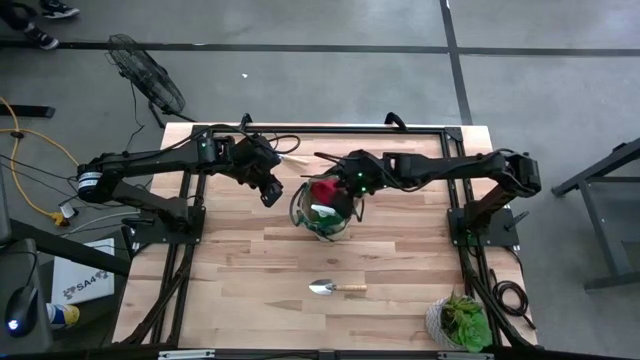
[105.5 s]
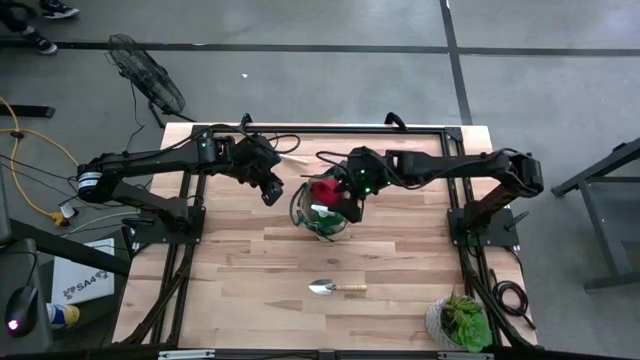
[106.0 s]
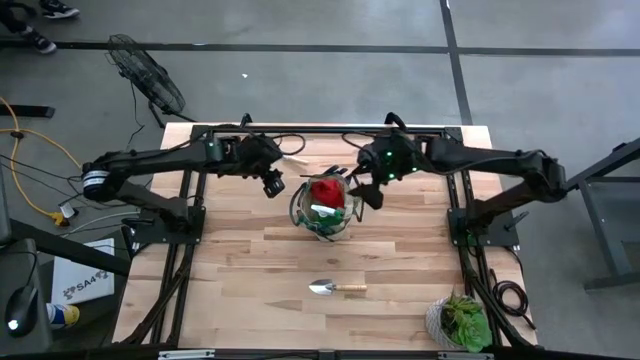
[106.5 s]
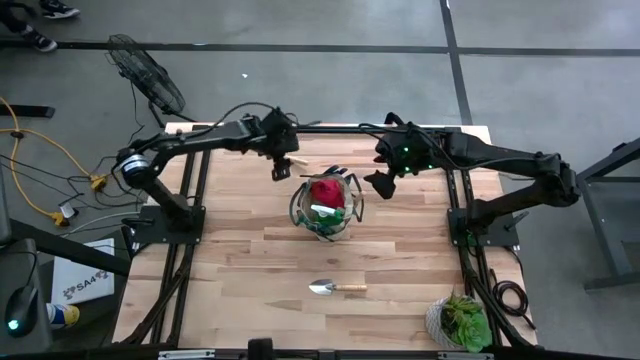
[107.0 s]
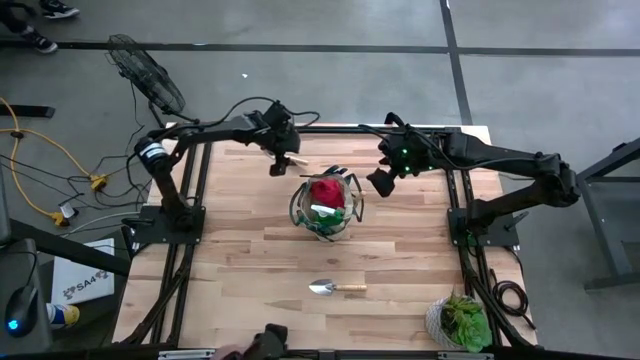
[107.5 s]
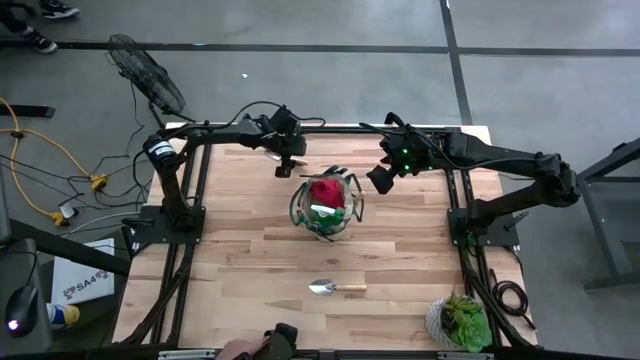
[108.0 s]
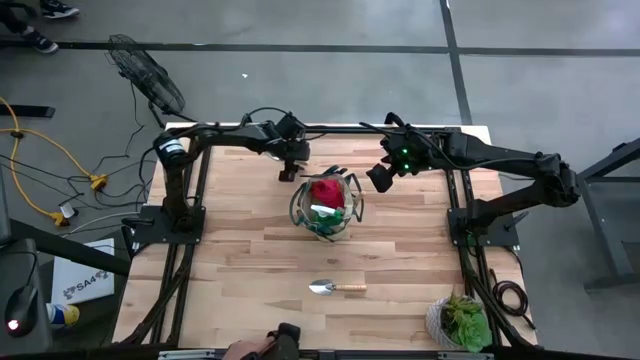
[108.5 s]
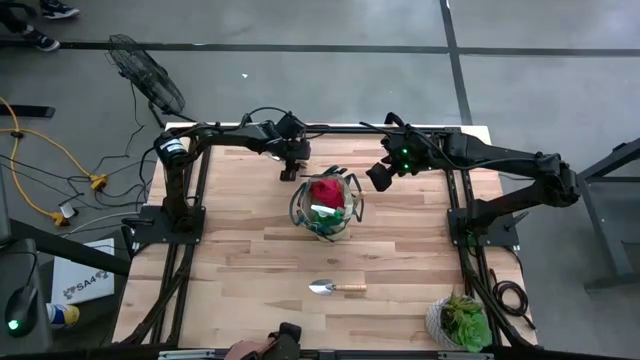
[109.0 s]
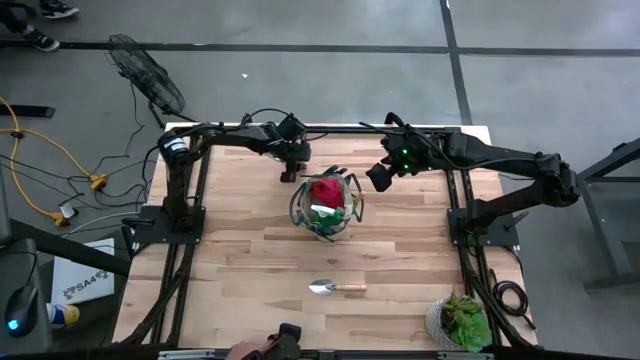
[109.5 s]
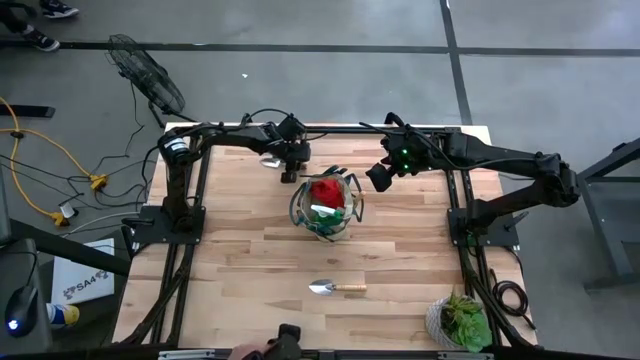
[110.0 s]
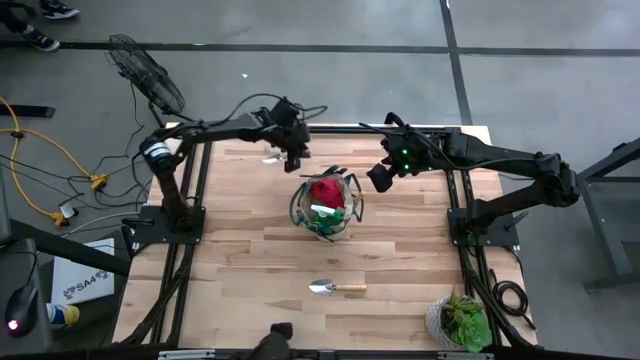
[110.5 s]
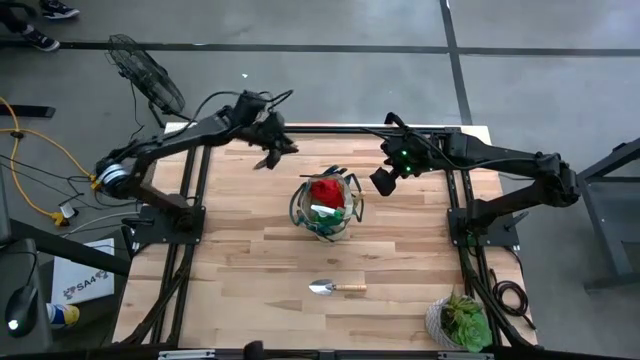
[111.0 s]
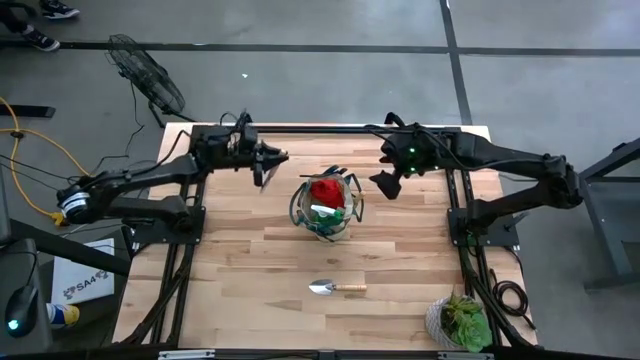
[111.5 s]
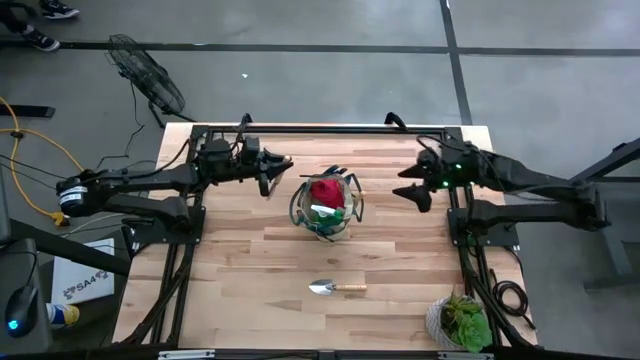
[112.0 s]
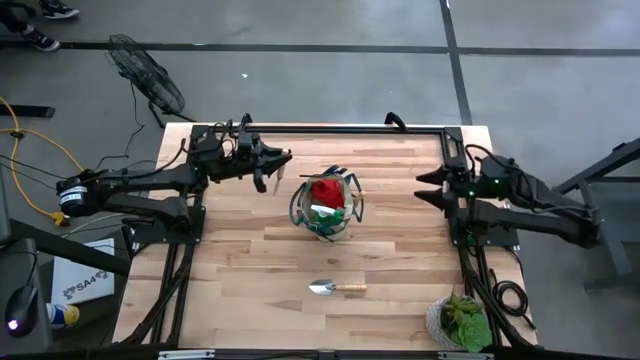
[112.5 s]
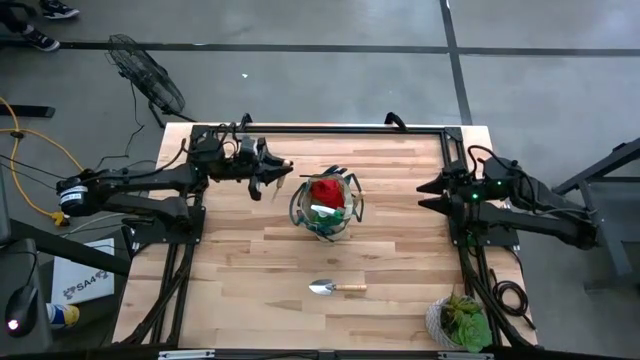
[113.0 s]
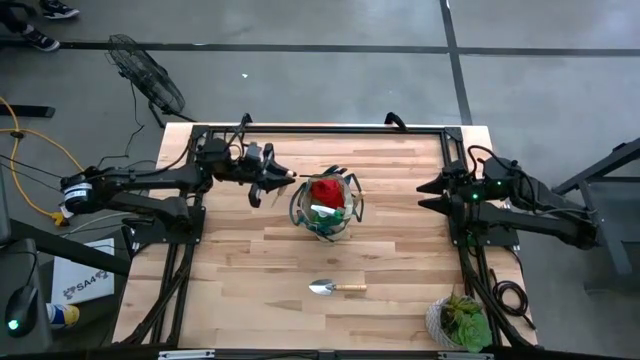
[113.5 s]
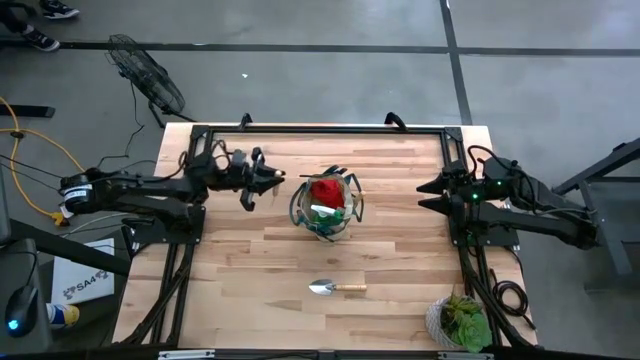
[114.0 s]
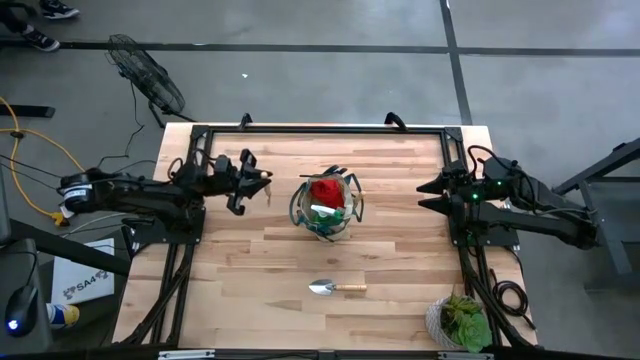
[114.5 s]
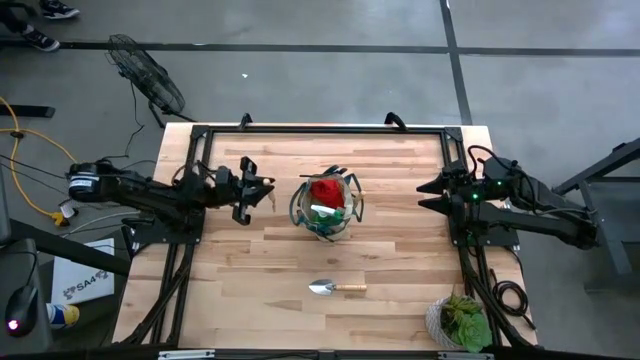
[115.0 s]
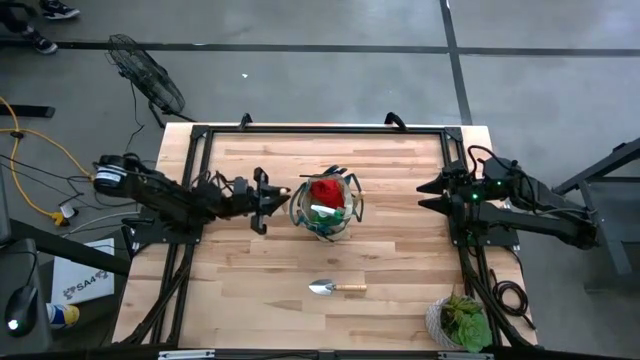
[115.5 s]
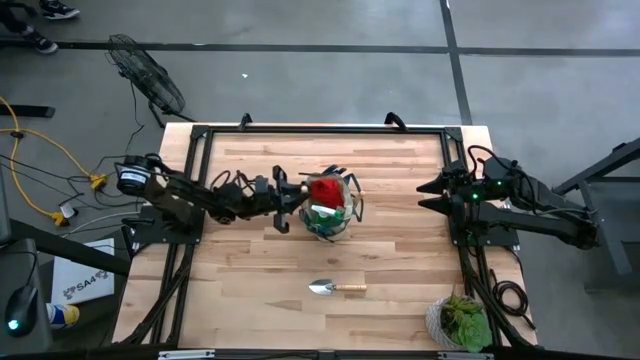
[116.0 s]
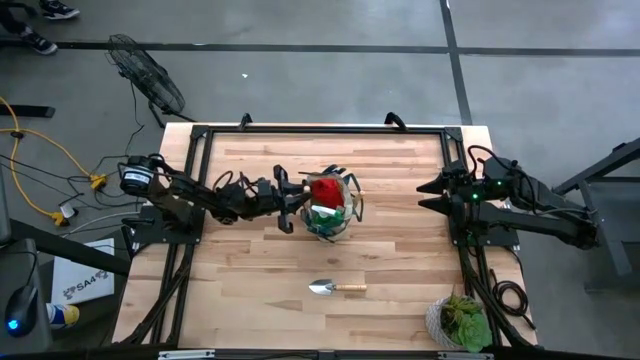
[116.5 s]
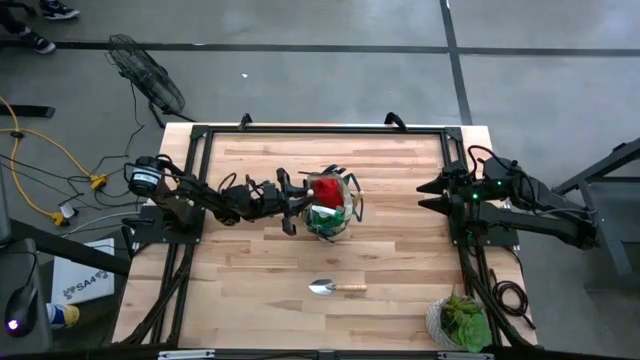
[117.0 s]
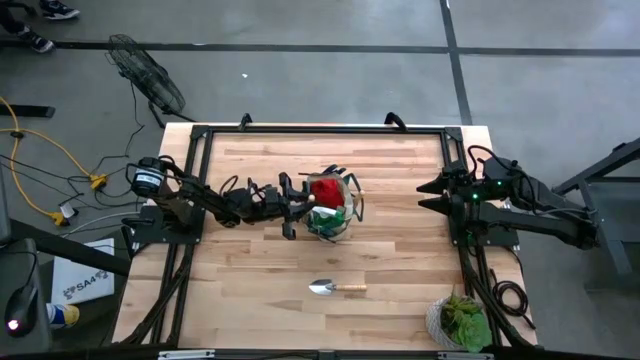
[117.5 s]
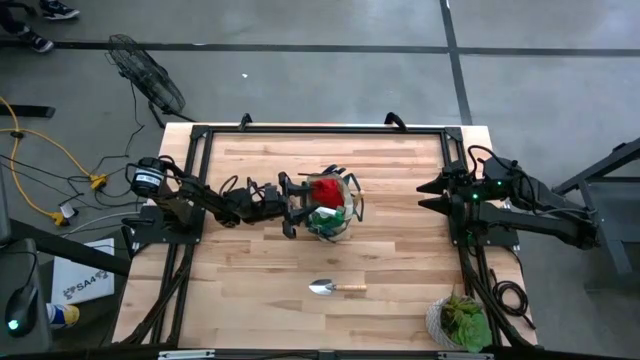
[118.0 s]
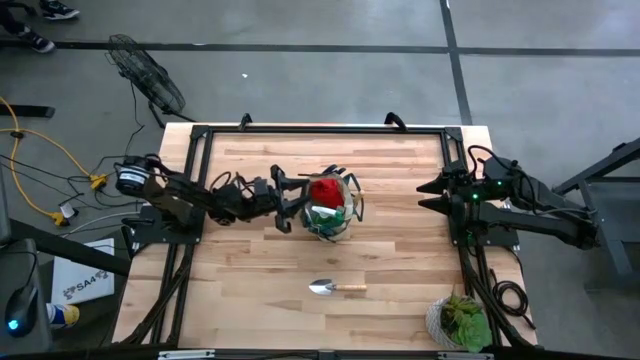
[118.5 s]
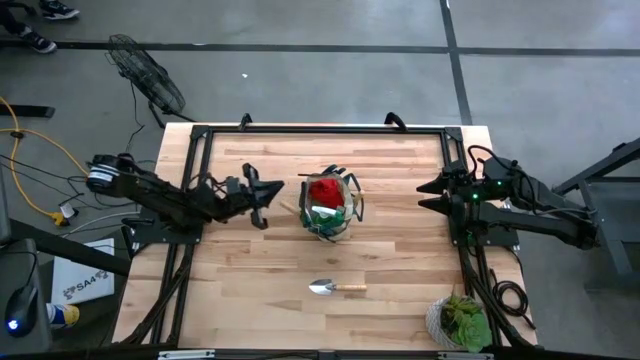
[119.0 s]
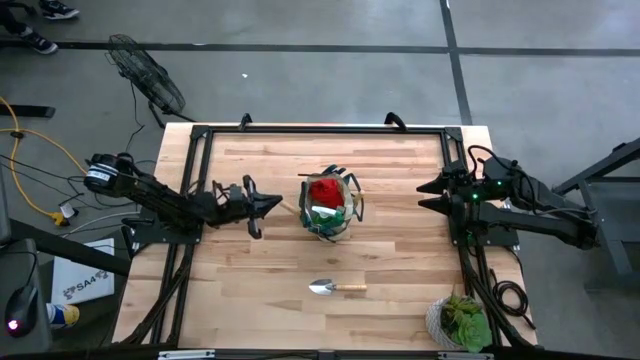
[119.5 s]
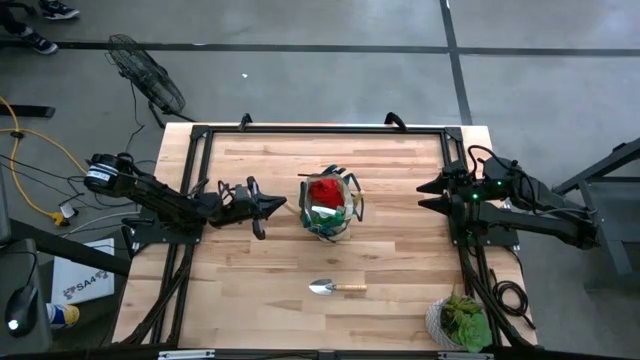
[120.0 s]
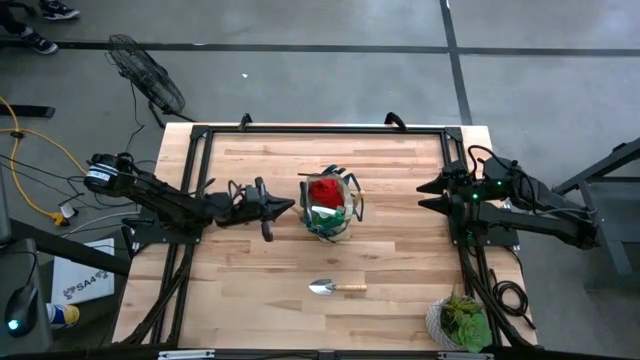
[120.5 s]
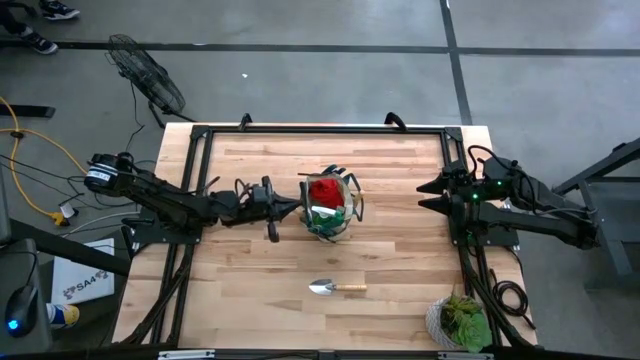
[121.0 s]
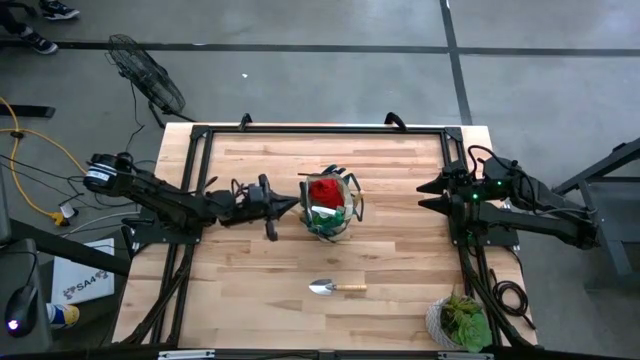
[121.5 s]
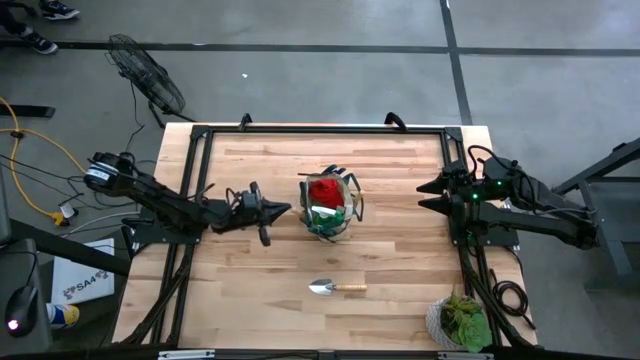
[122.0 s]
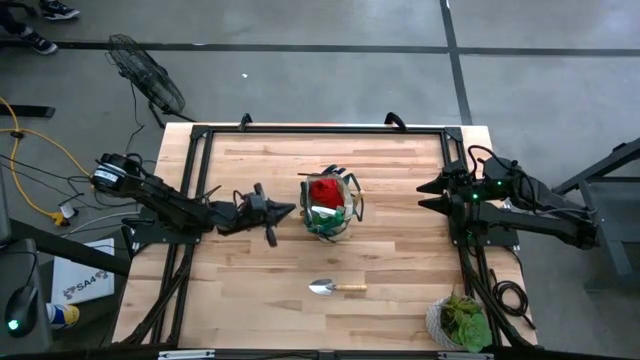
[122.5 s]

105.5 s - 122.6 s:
Task: Pick & Place Garden tools in Gardening bag
Put the top trowel into the gardening bag
